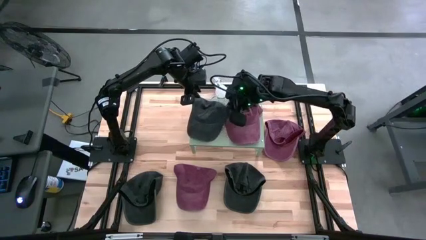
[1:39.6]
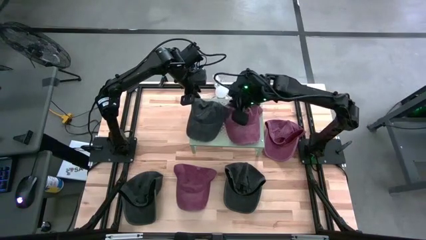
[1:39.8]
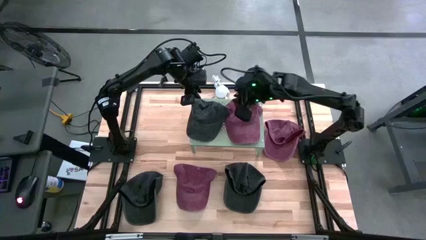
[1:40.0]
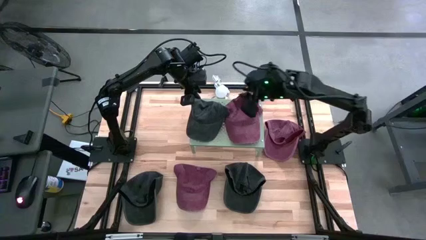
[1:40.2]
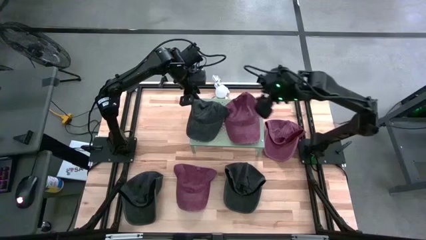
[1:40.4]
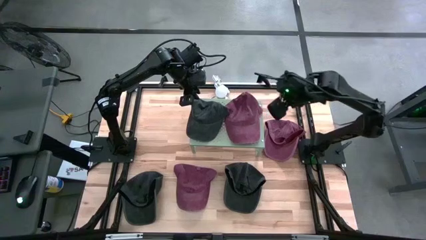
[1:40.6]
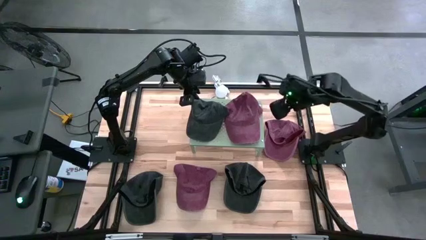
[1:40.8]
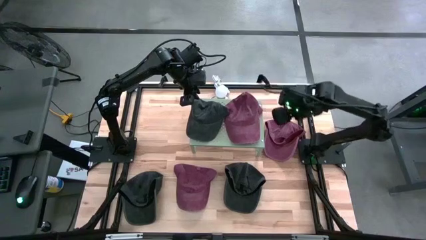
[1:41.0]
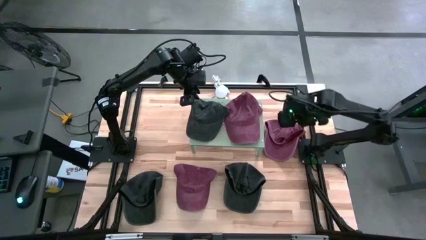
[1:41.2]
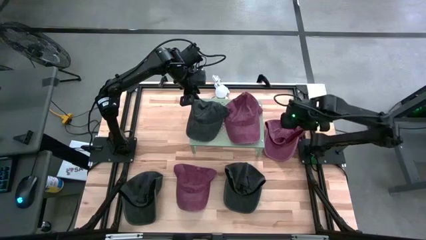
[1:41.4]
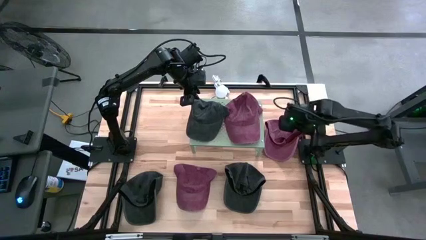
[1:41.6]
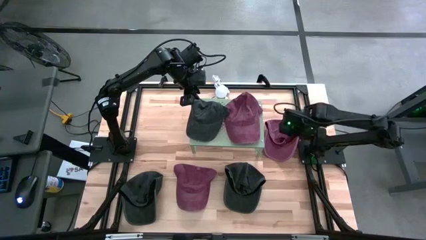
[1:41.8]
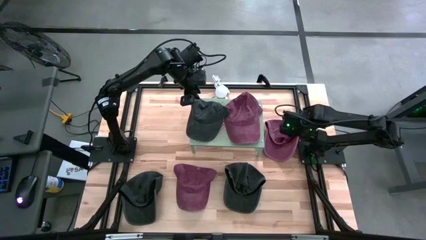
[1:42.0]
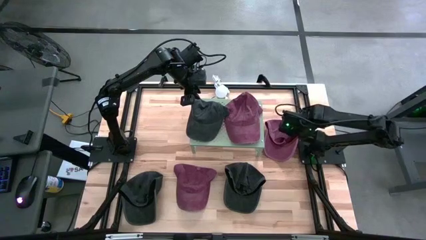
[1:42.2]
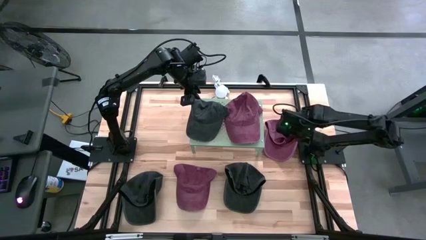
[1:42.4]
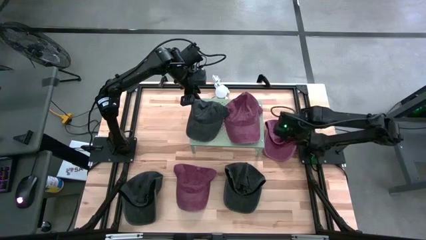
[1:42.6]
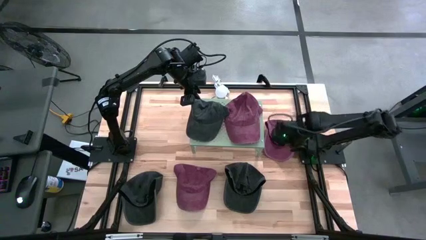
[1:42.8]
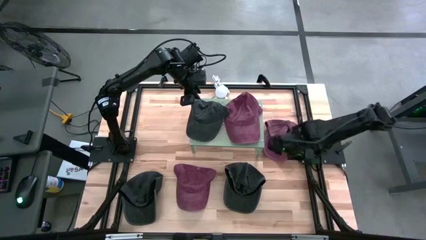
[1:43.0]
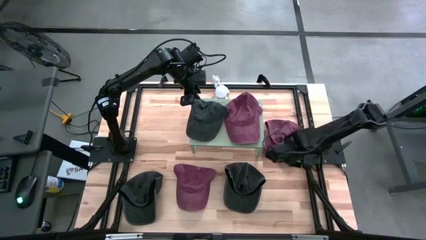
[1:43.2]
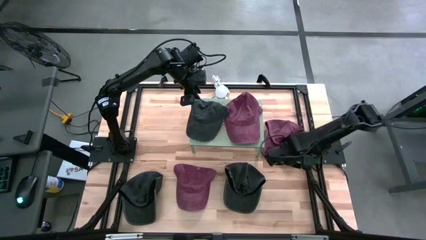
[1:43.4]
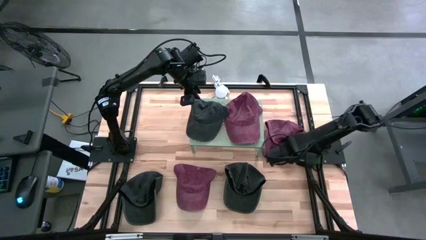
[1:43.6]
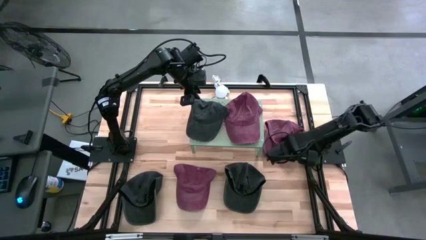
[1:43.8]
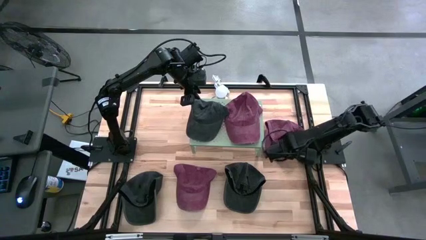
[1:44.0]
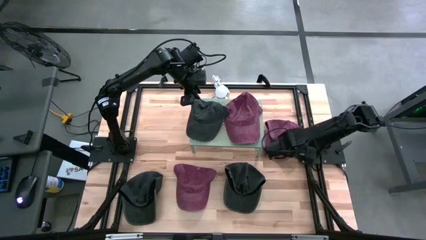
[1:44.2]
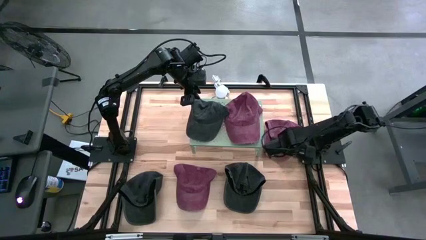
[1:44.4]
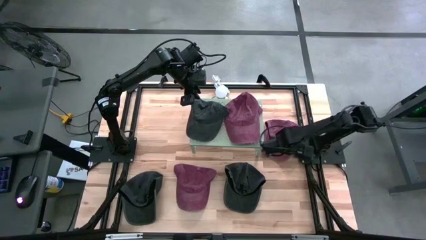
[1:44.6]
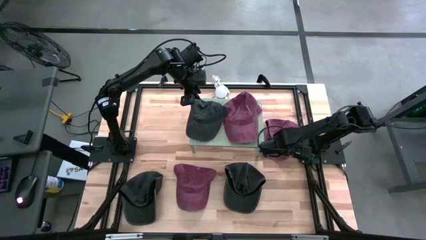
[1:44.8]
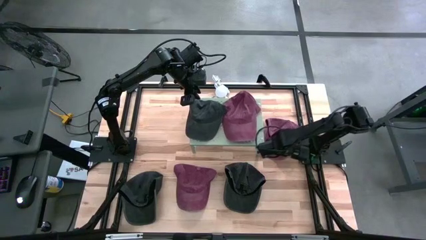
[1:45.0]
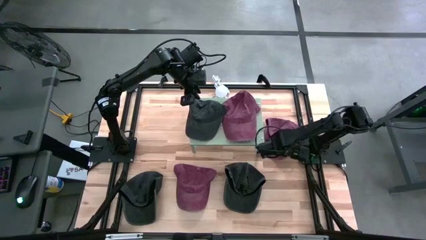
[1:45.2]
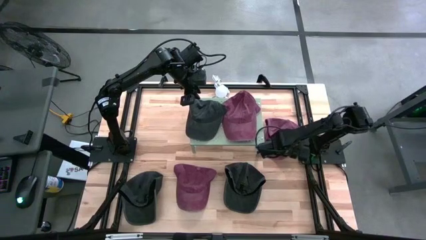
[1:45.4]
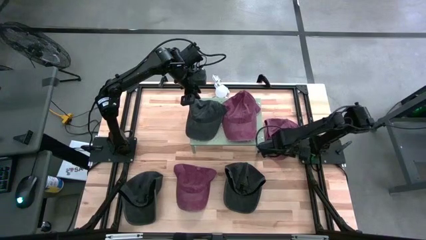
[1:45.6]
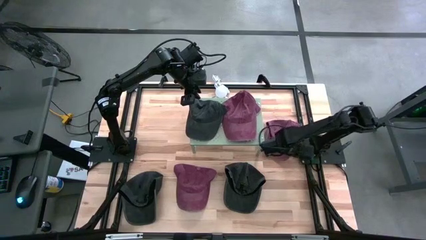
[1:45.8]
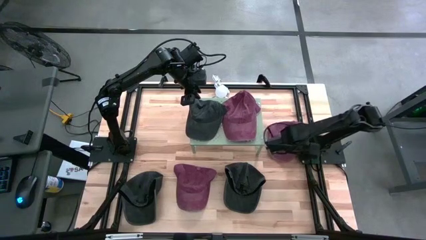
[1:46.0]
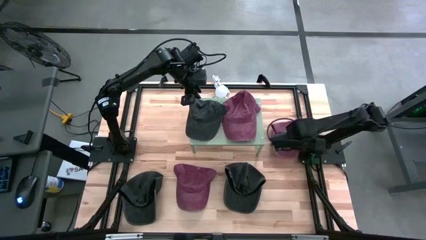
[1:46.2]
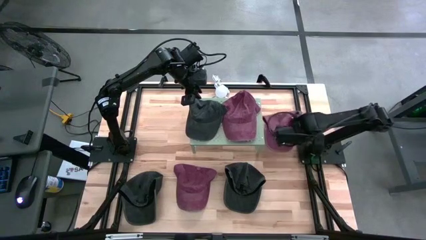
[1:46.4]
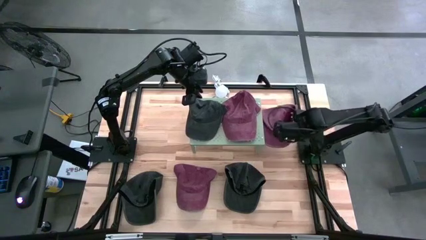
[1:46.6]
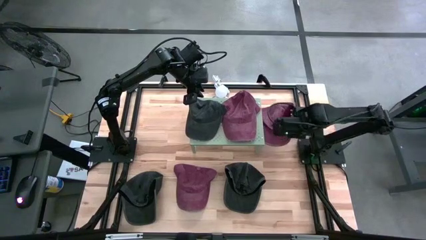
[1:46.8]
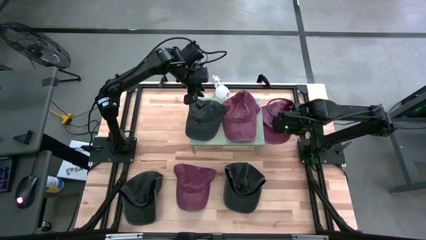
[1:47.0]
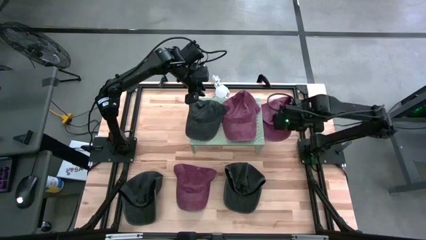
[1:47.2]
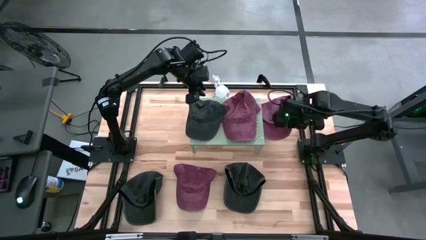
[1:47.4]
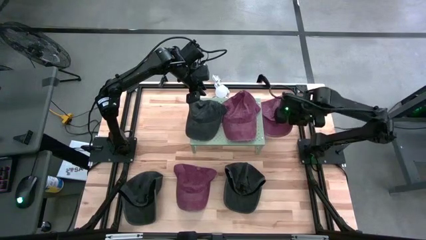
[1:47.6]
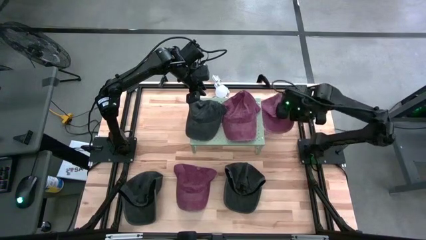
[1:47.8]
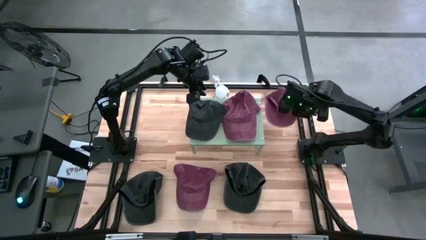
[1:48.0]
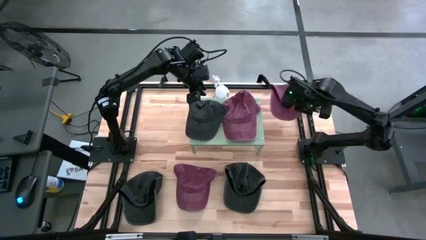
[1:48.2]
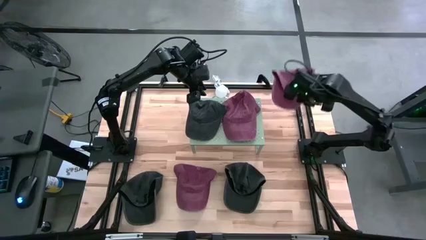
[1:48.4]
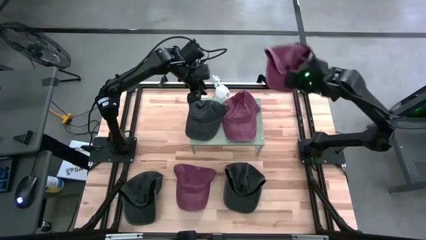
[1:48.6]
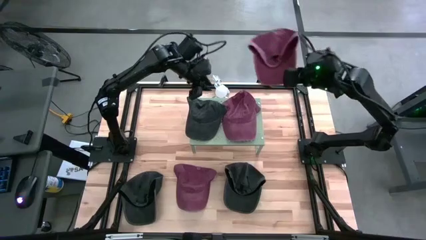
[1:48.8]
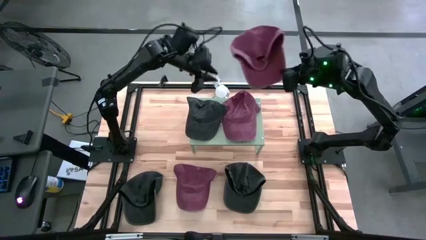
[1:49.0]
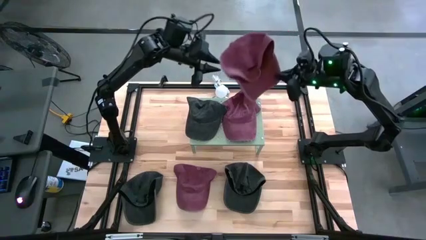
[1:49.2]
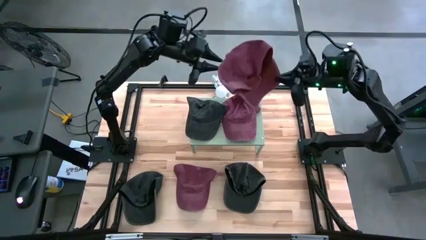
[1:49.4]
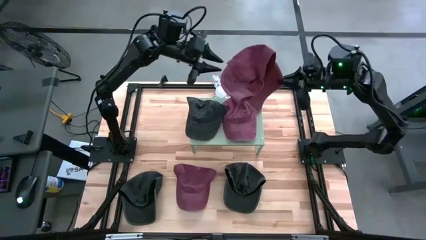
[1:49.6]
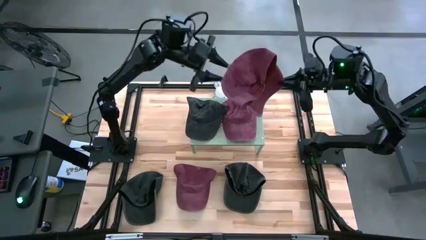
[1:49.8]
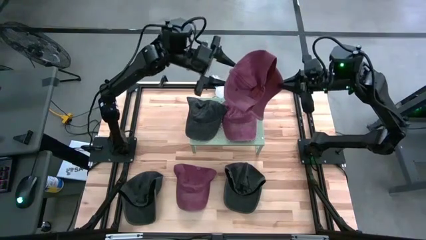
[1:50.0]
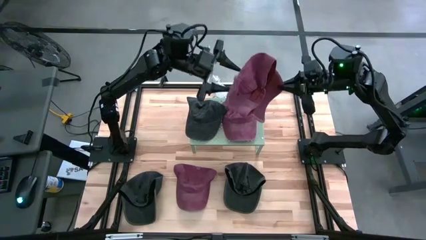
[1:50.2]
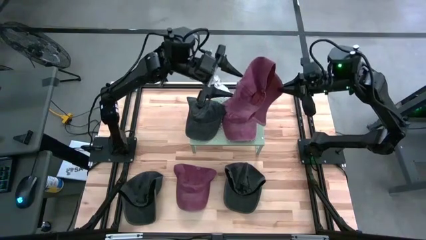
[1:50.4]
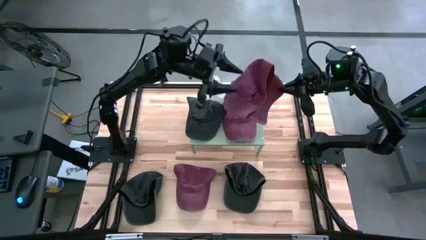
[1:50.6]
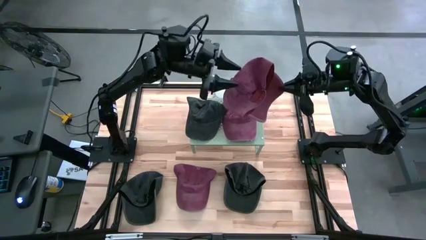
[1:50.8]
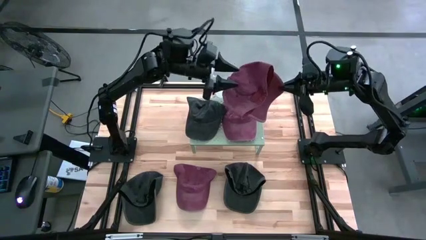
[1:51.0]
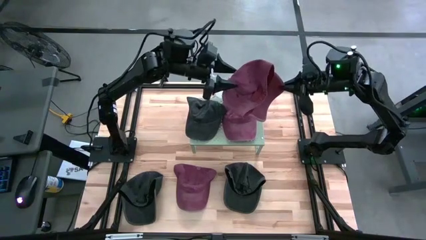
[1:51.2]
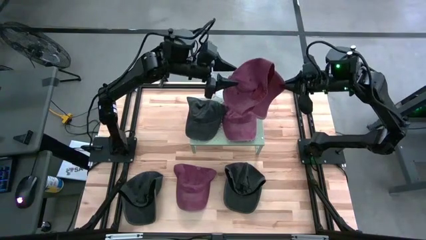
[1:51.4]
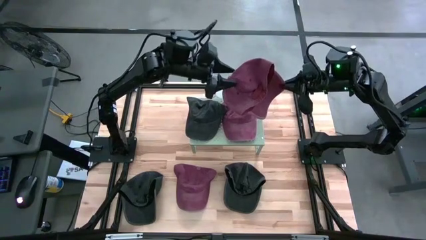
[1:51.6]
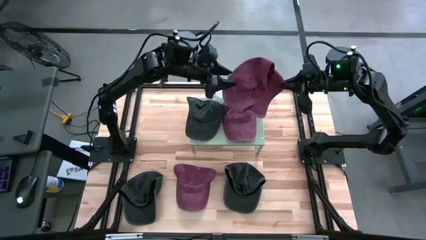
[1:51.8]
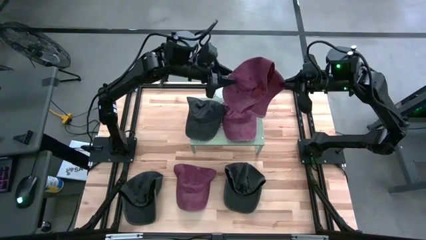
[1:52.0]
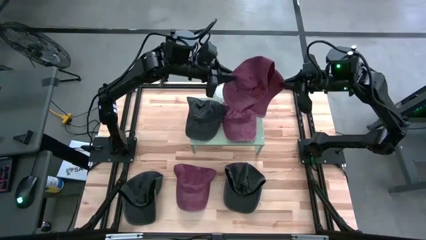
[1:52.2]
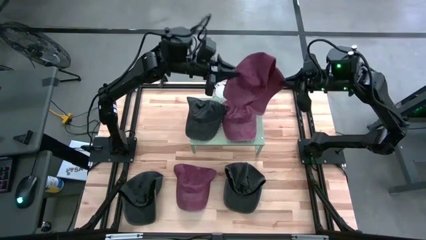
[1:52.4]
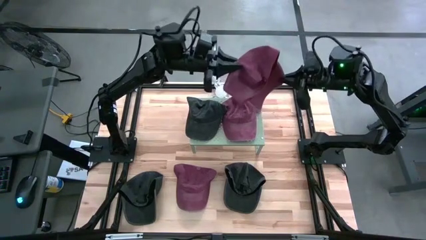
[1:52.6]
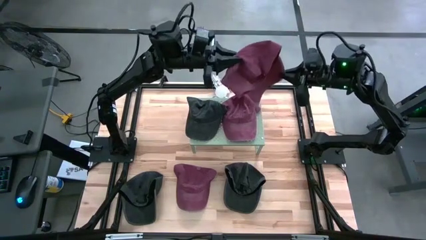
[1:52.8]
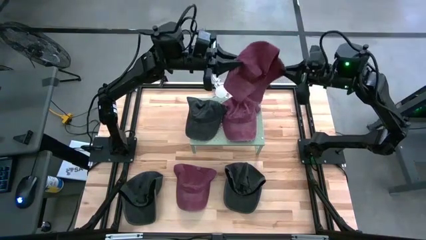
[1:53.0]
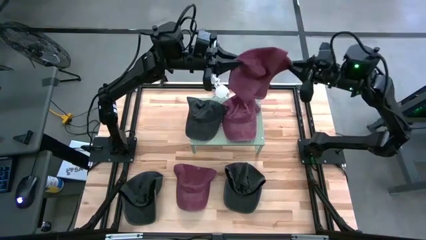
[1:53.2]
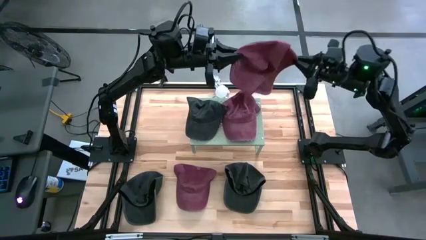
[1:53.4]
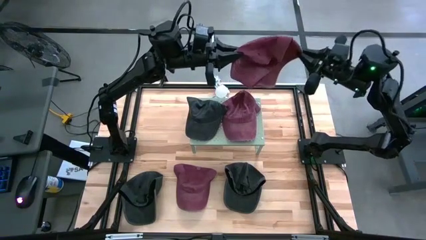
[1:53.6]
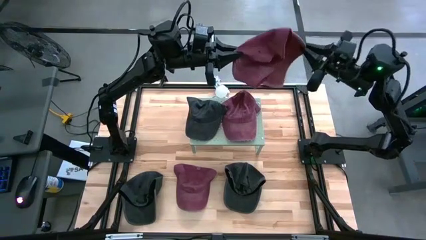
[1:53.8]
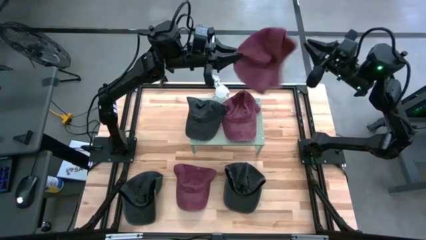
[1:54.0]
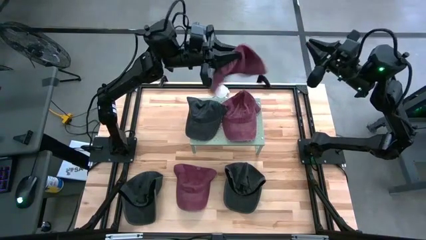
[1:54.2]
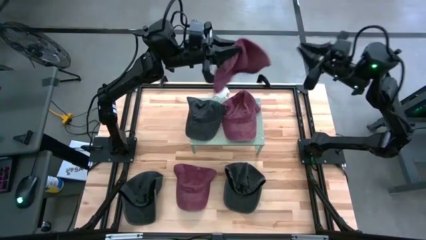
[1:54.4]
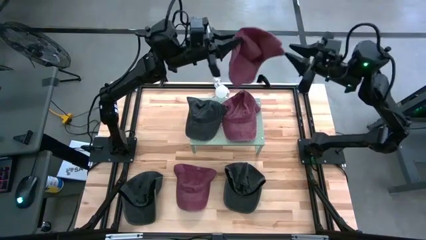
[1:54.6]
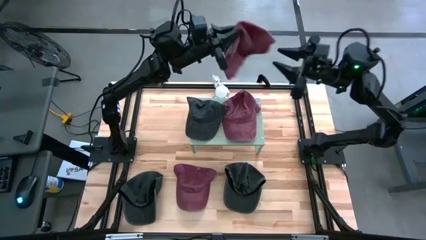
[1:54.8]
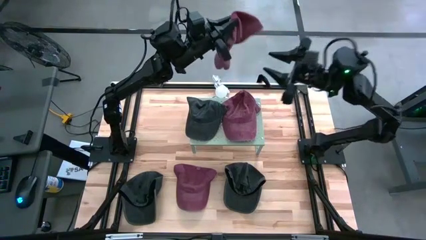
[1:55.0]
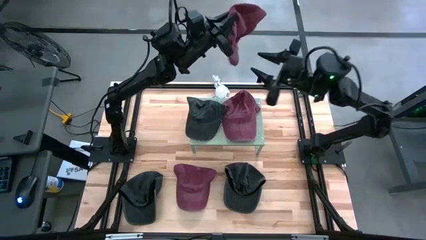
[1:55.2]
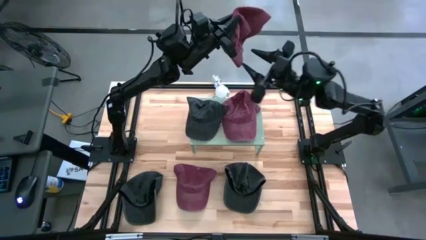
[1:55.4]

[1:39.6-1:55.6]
Task: Pick & Place hat
Stack the top red cap on top of the red cap on the shelf

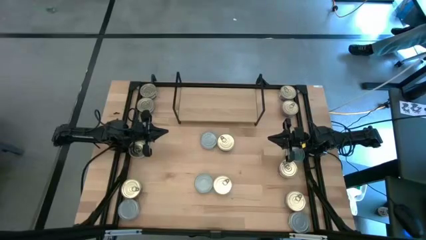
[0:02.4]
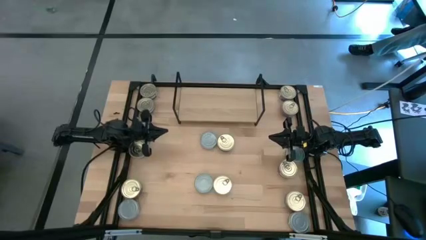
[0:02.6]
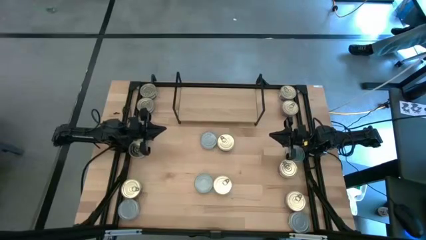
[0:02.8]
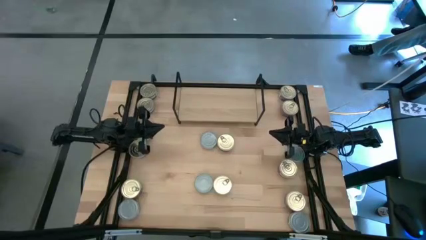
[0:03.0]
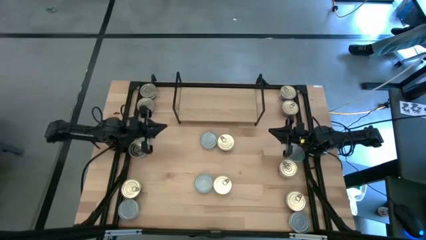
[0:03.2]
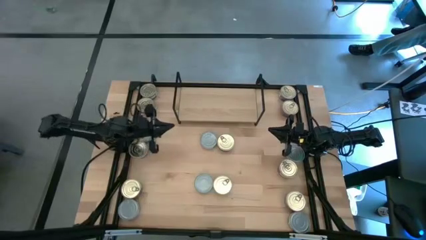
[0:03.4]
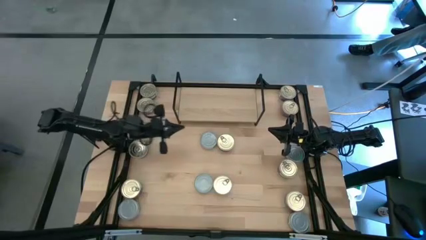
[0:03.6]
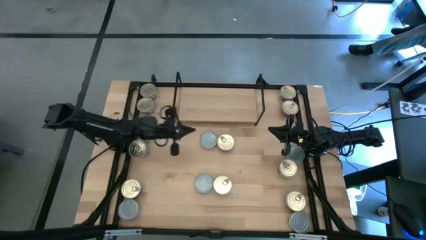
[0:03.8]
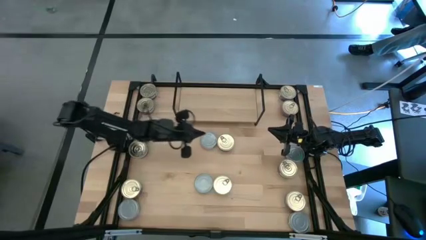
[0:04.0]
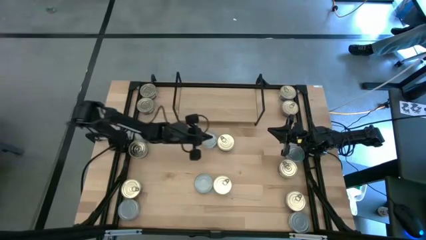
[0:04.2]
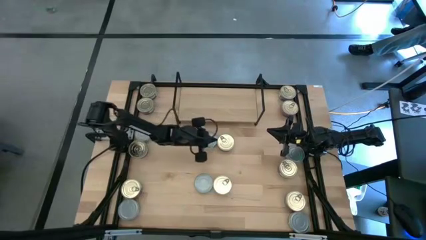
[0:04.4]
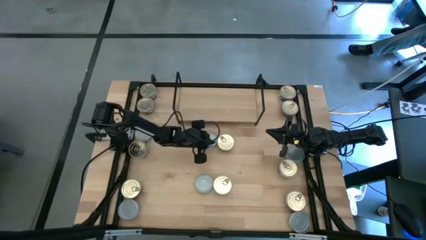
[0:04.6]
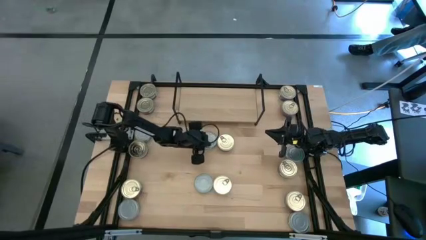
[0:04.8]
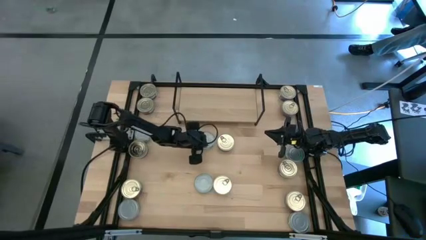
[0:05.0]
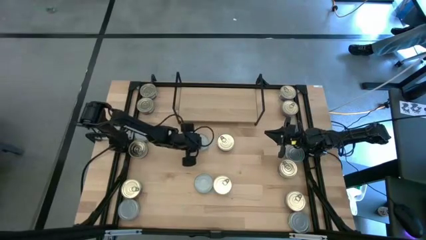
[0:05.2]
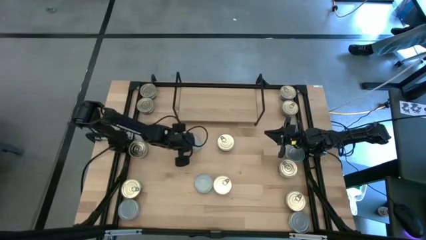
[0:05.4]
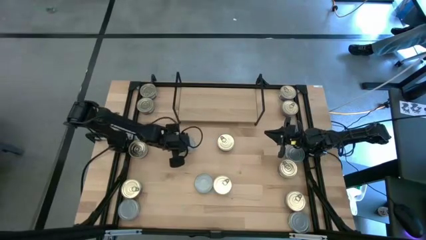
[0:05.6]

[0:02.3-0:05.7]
Task: Stack canned seafood by type on shelf
Move the green-white tuna can to the left of the table
